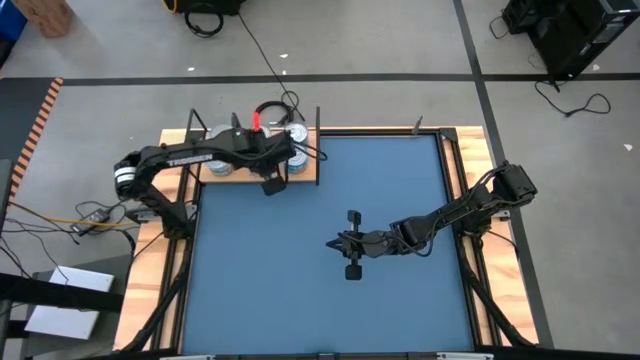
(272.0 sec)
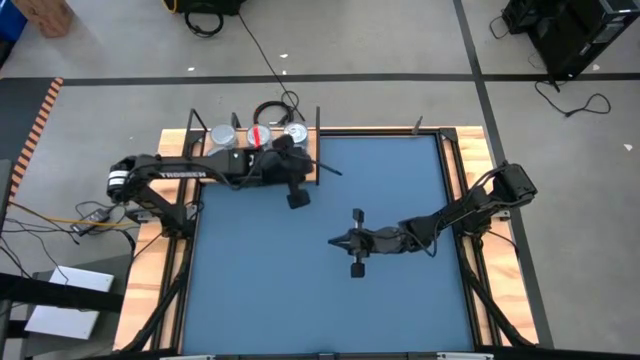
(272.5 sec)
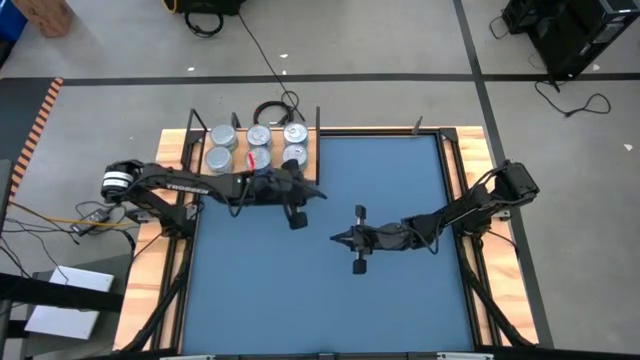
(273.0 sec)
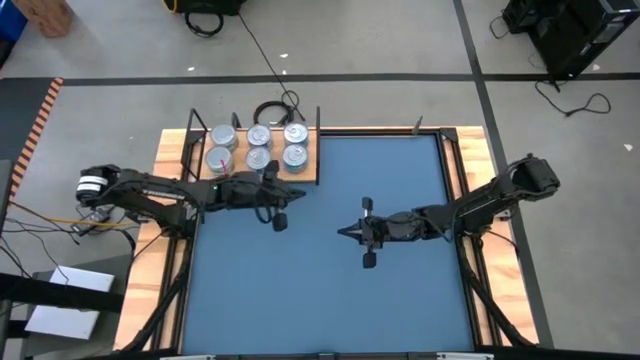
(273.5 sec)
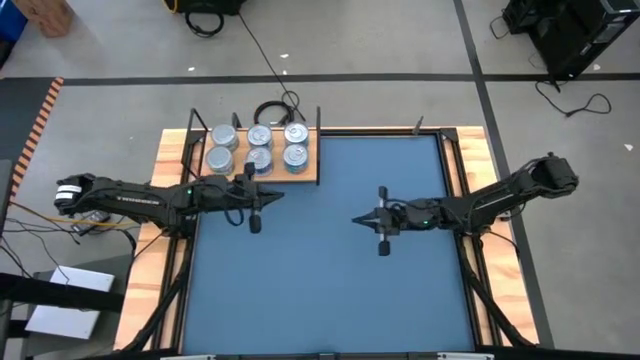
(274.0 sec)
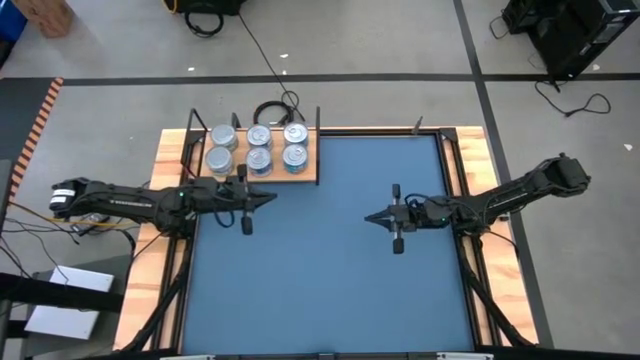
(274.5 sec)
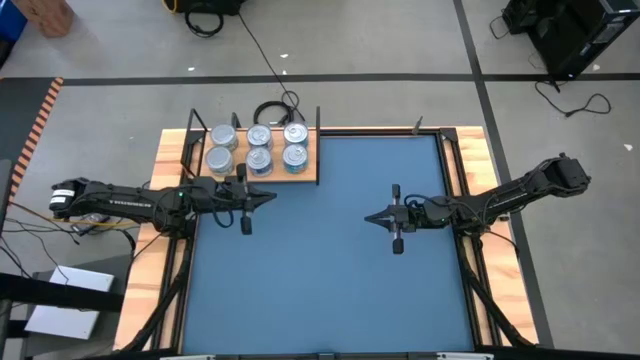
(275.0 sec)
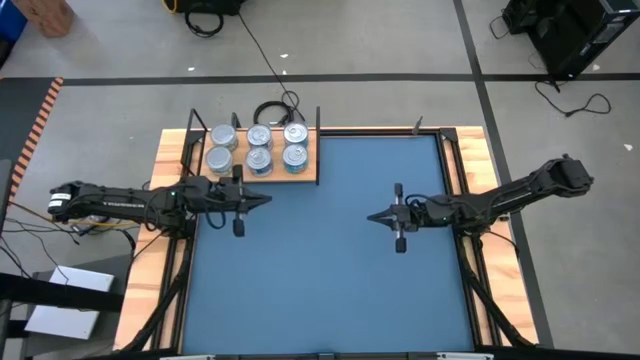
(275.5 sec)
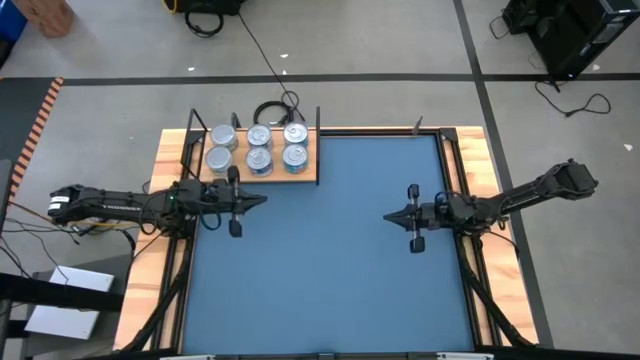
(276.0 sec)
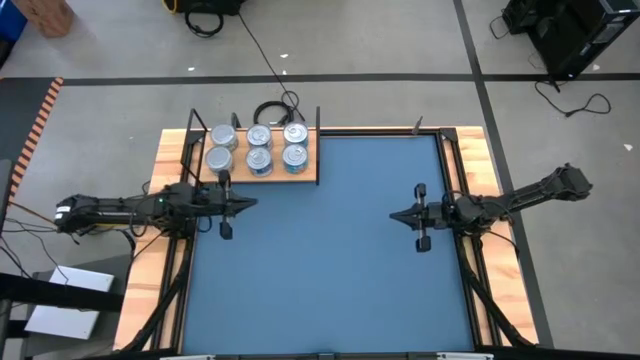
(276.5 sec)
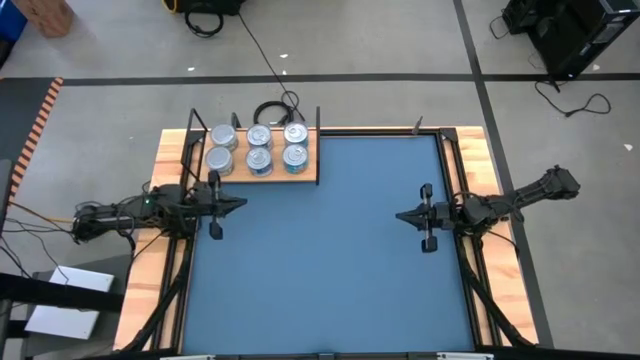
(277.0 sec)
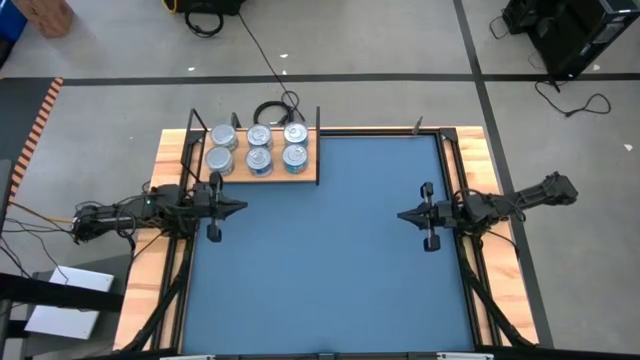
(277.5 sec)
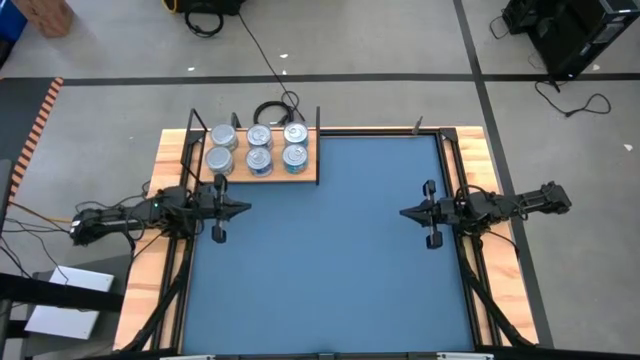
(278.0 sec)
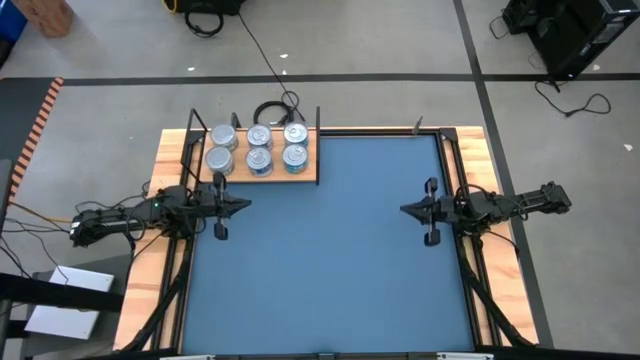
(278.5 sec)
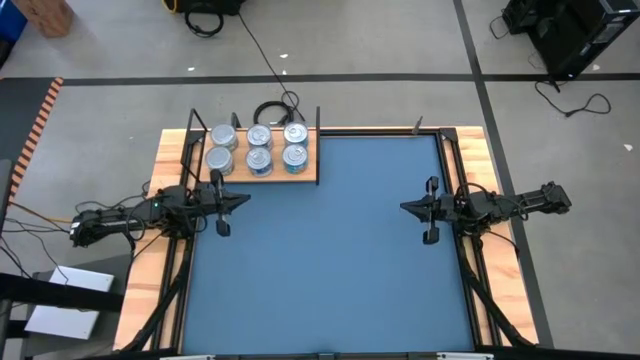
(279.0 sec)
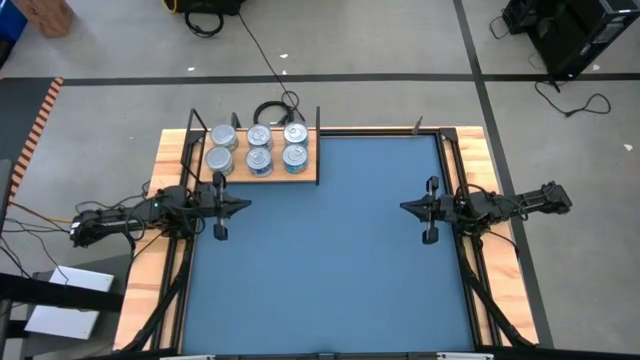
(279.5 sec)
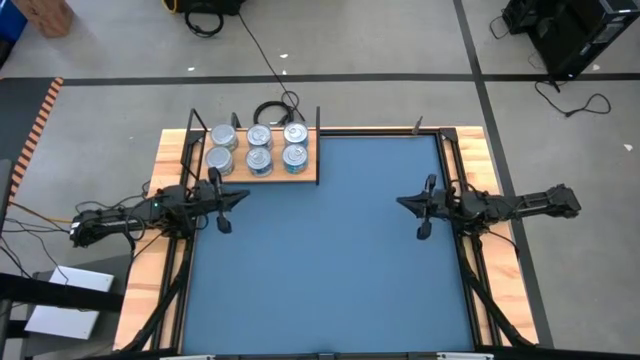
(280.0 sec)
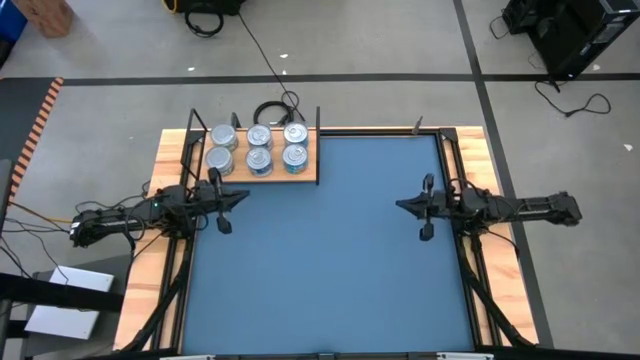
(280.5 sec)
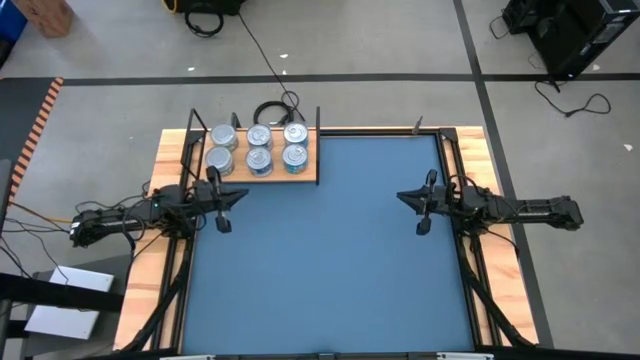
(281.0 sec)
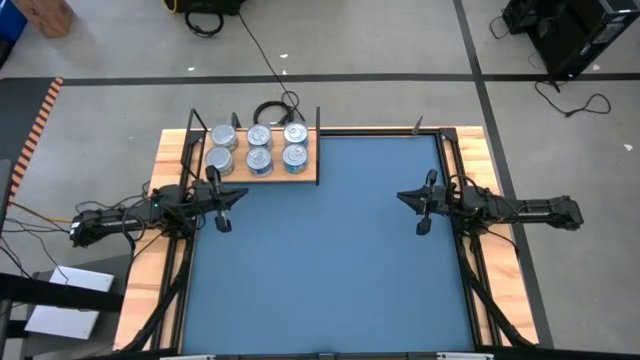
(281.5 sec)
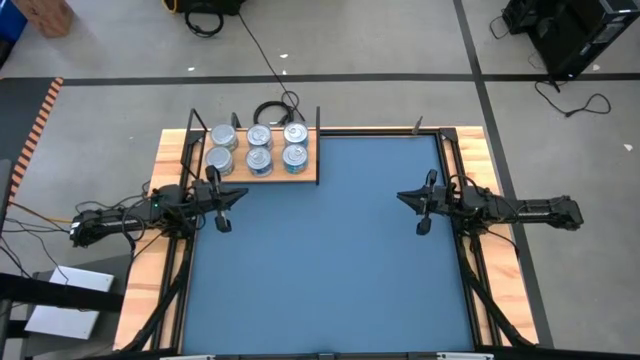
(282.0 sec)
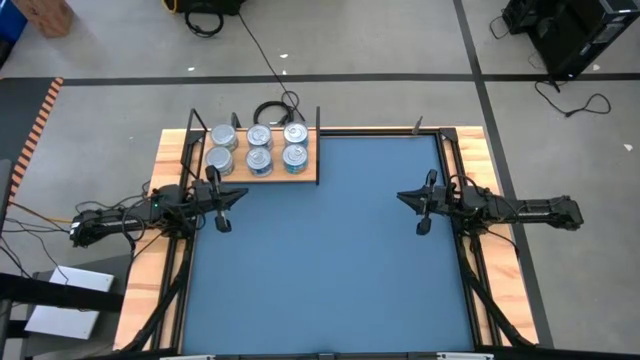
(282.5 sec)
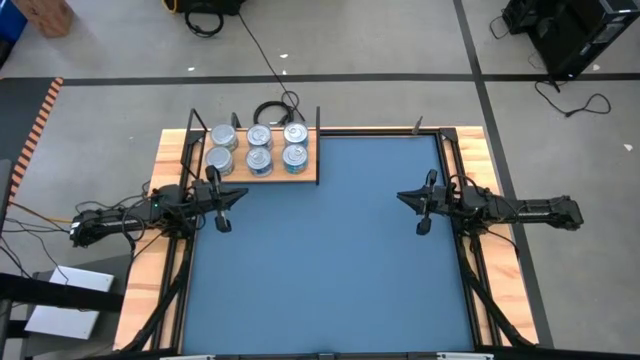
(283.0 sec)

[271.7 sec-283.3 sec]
Task: Stack canned seafood by type on shelf
Return to Home Position

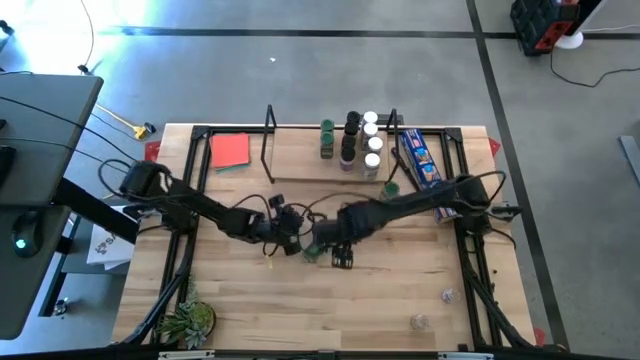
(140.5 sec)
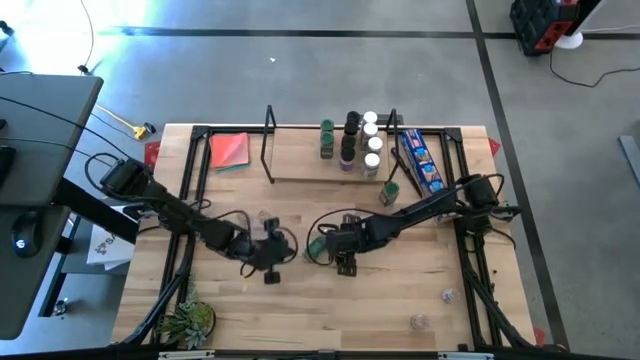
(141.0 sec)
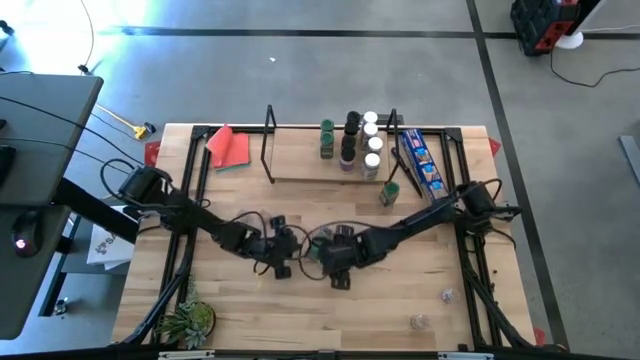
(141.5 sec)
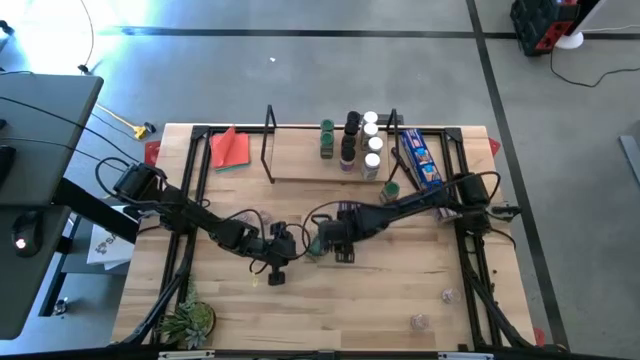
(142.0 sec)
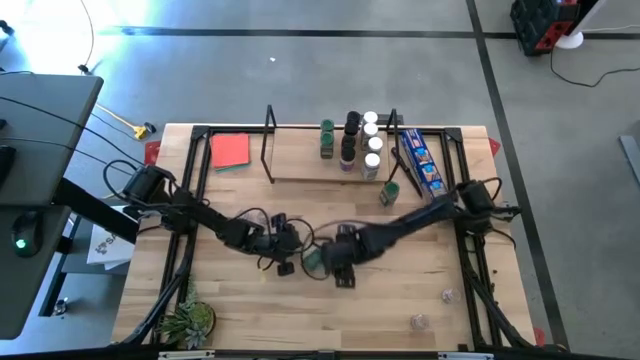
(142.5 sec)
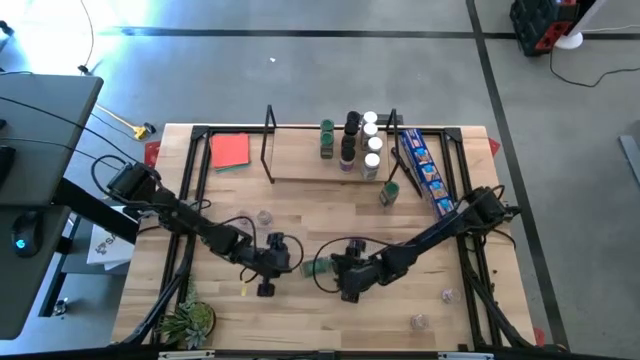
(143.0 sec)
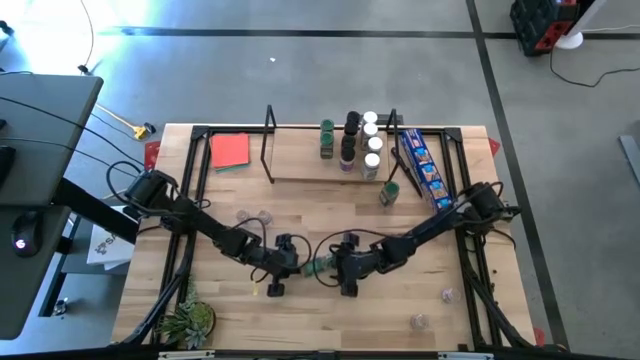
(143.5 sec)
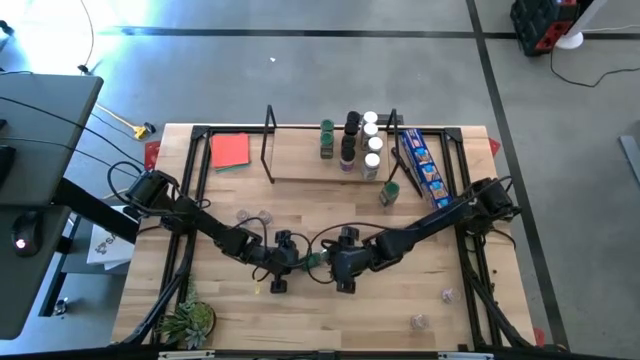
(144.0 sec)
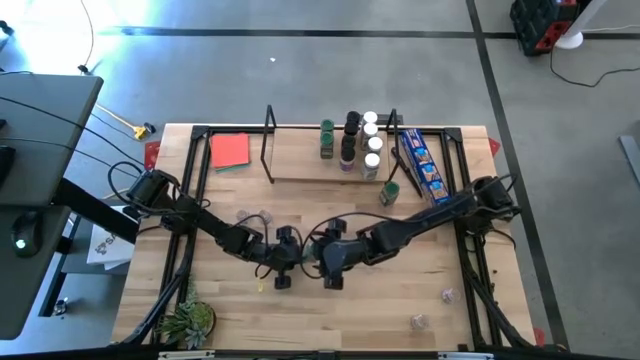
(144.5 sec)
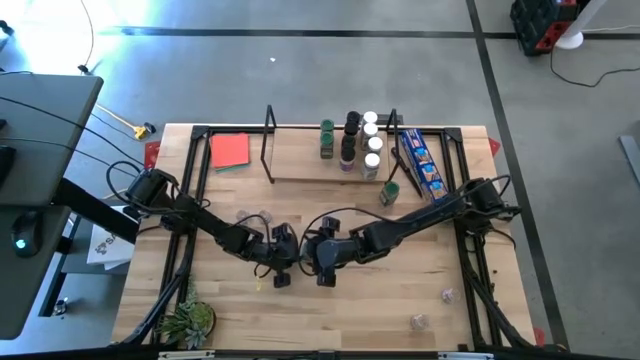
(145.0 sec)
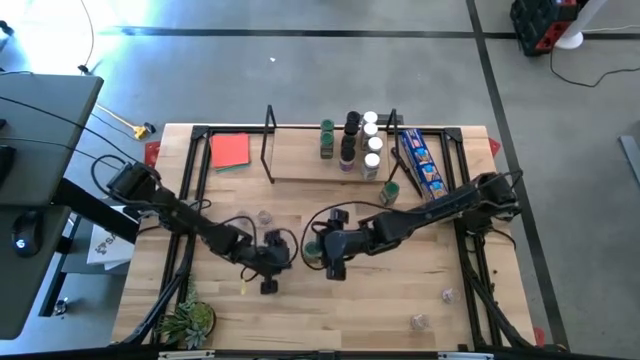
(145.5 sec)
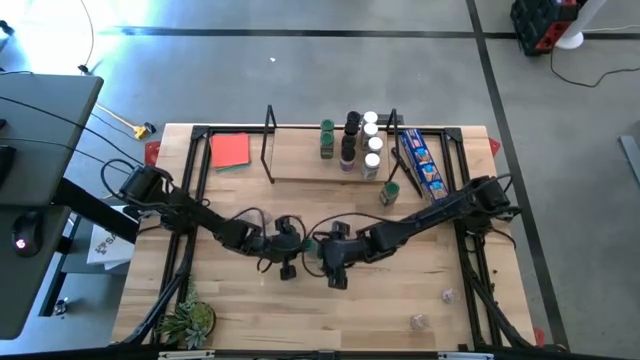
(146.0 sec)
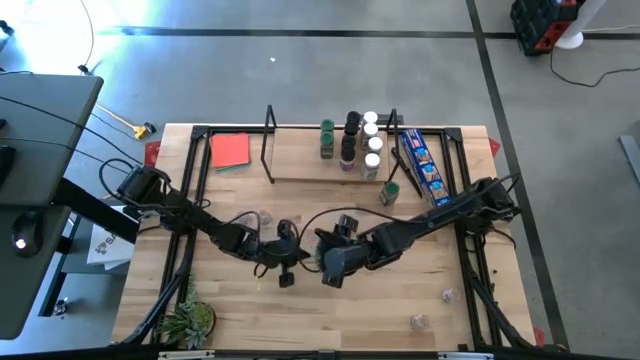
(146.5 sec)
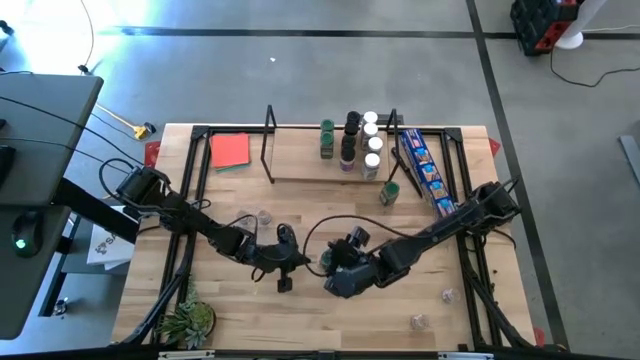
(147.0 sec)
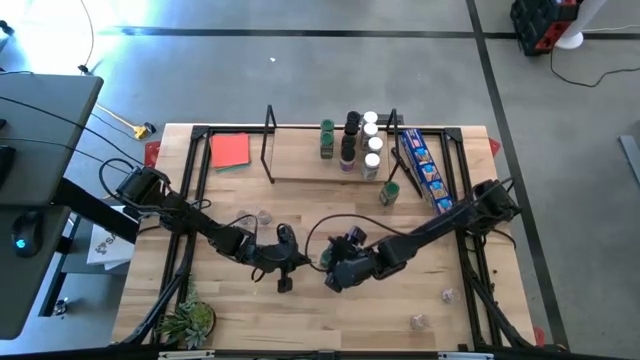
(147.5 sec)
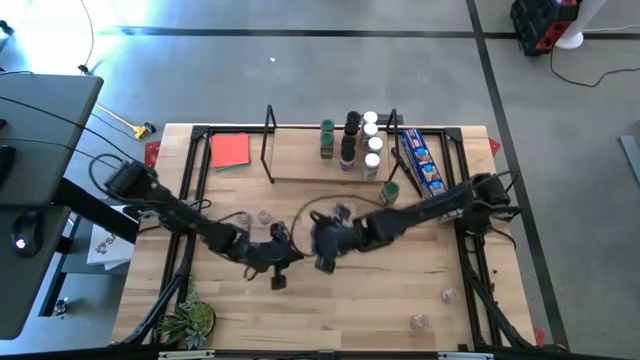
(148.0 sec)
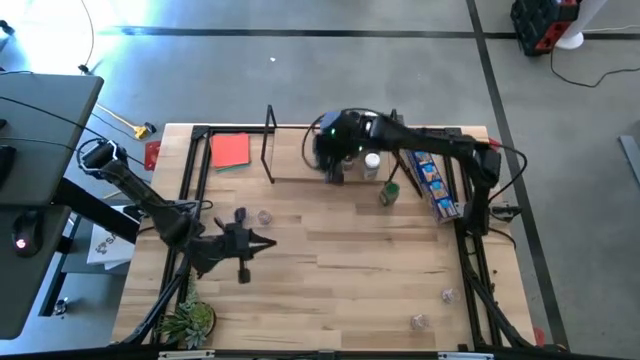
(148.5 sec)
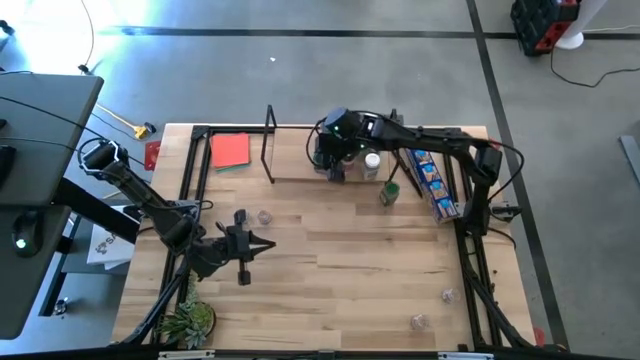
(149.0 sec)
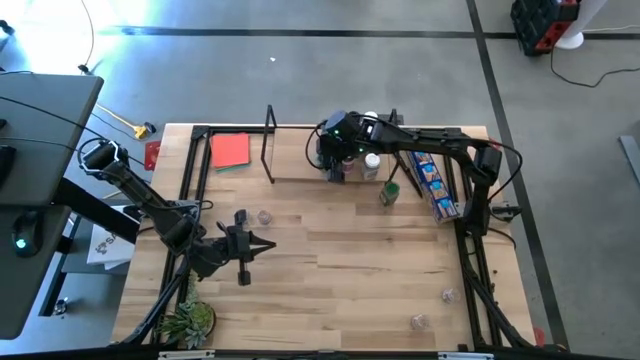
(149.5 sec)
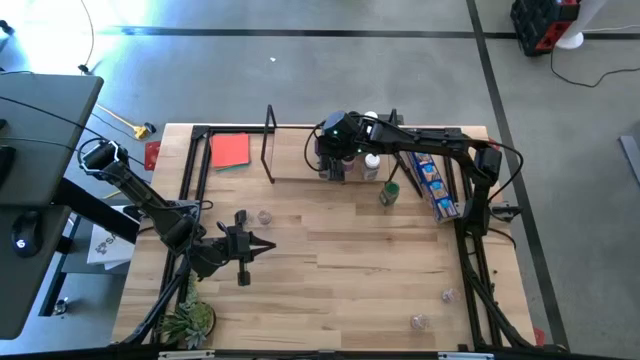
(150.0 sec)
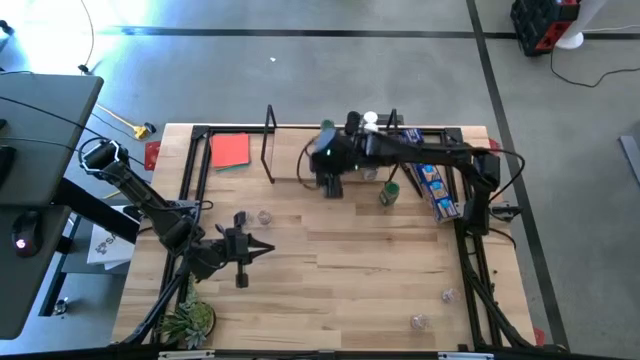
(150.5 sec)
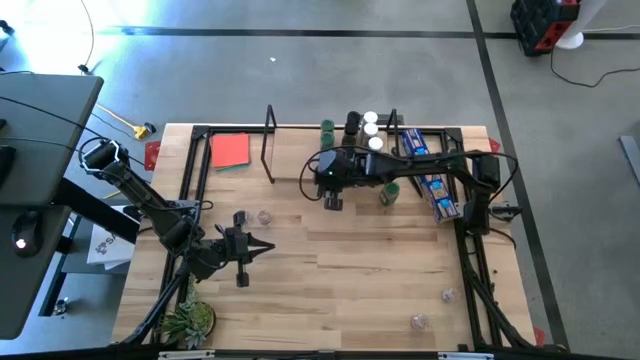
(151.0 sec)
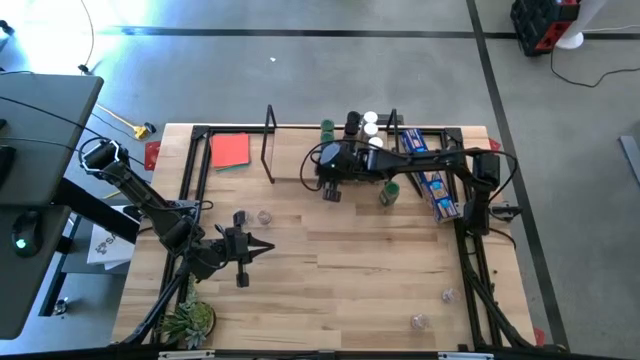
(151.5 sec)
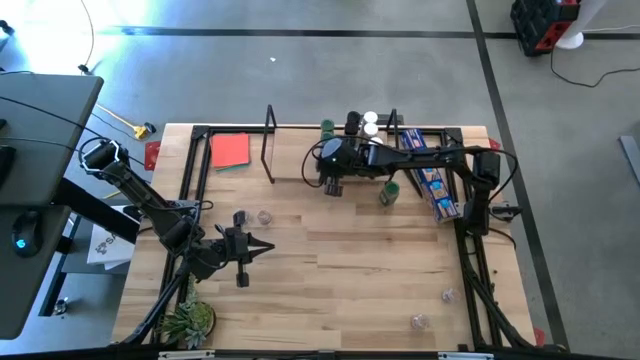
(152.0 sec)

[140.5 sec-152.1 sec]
Task: Shelf spices
Put the left green seasoning bottle on the shelf aligned with the other green seasoning bottle bottles
